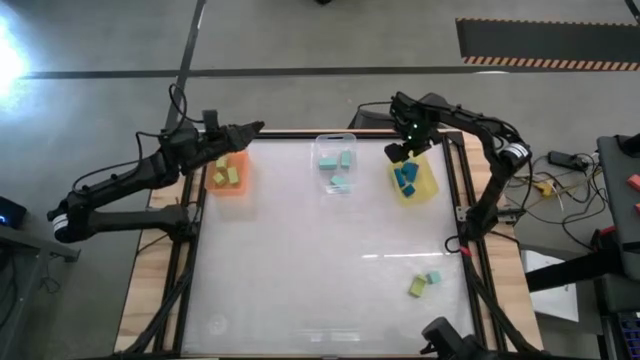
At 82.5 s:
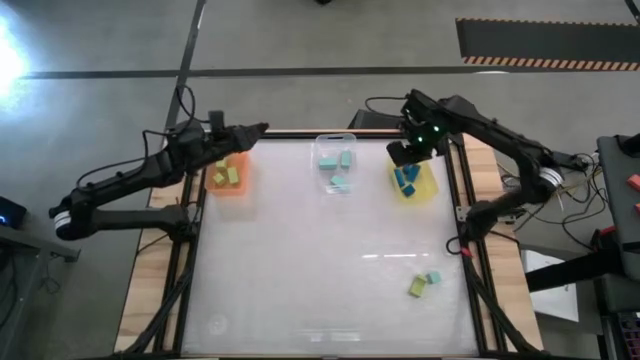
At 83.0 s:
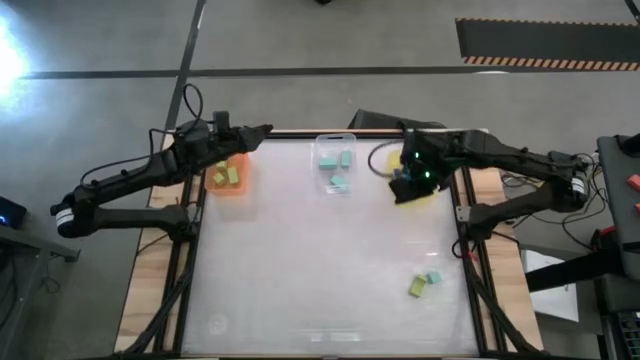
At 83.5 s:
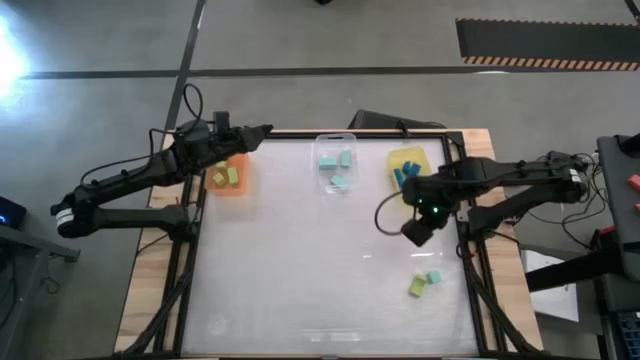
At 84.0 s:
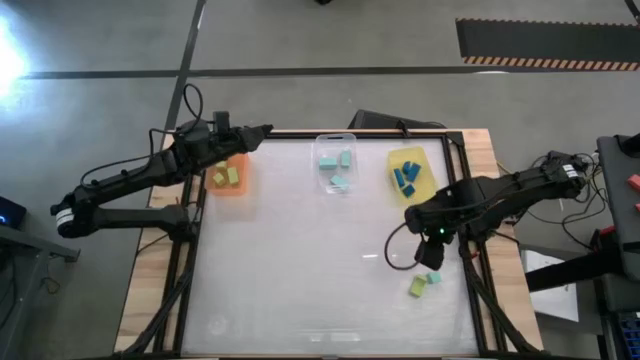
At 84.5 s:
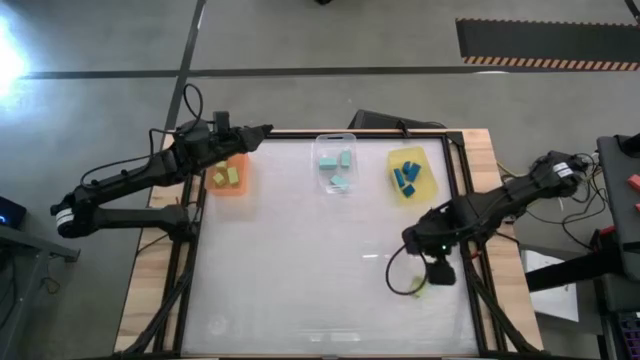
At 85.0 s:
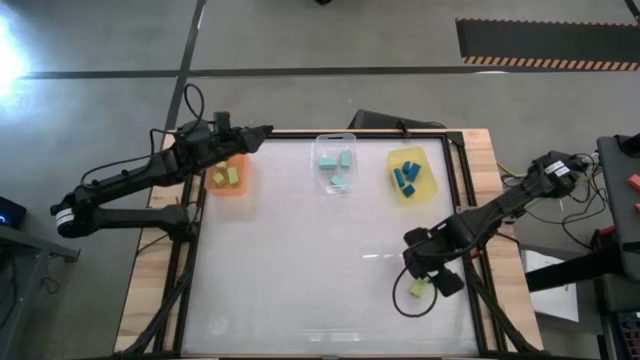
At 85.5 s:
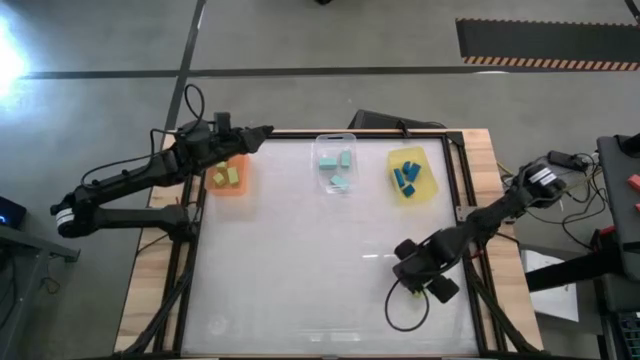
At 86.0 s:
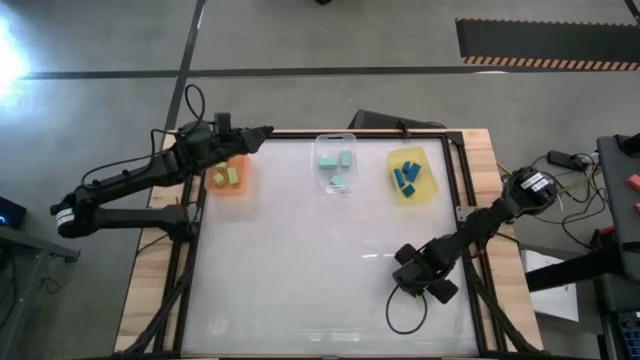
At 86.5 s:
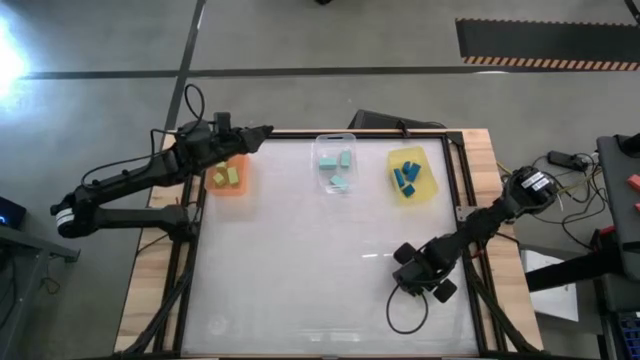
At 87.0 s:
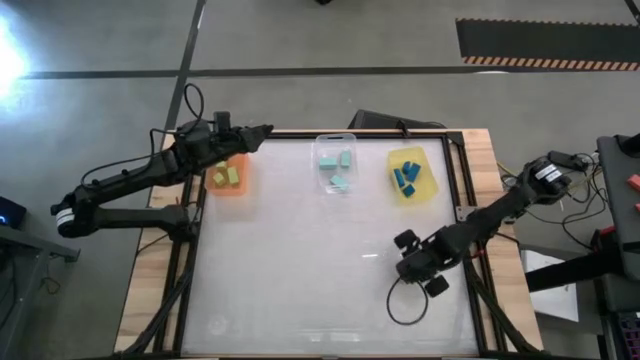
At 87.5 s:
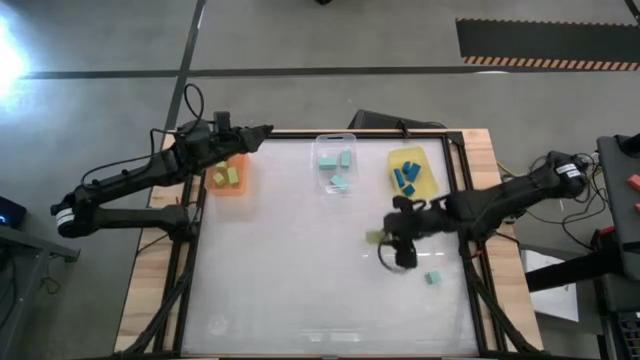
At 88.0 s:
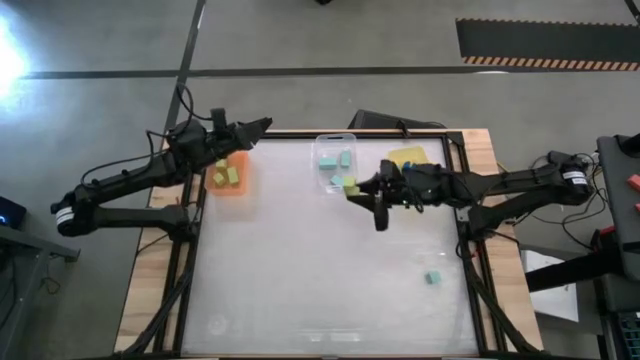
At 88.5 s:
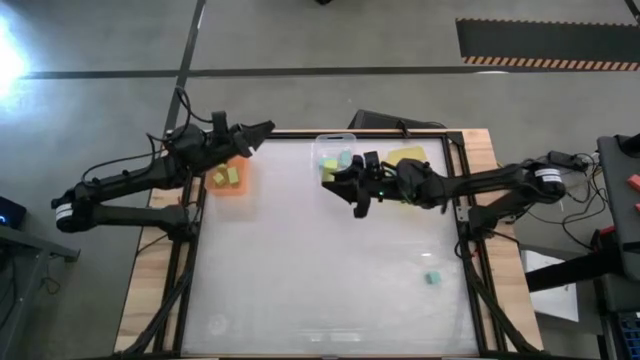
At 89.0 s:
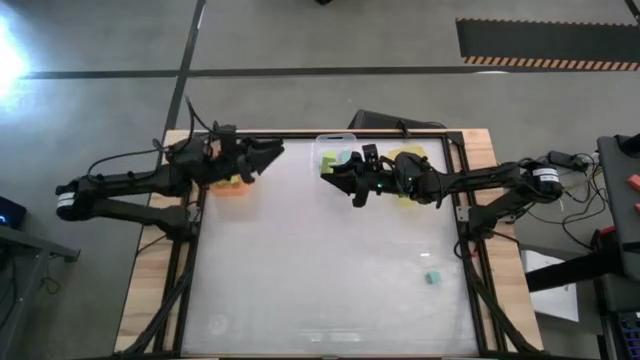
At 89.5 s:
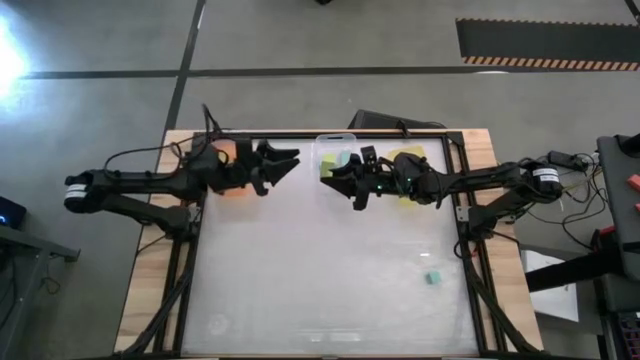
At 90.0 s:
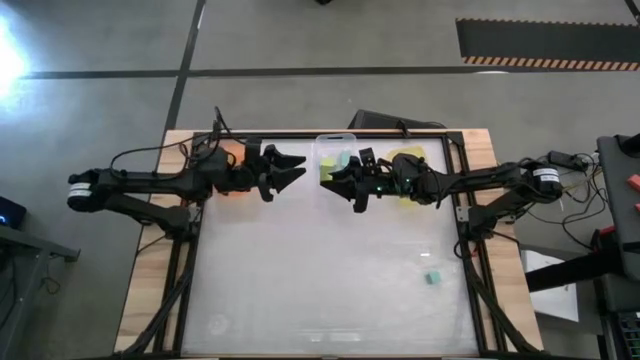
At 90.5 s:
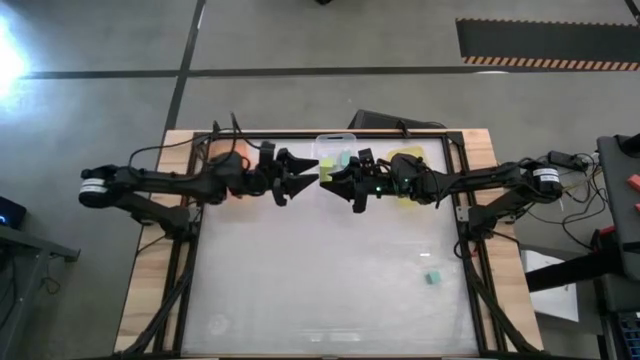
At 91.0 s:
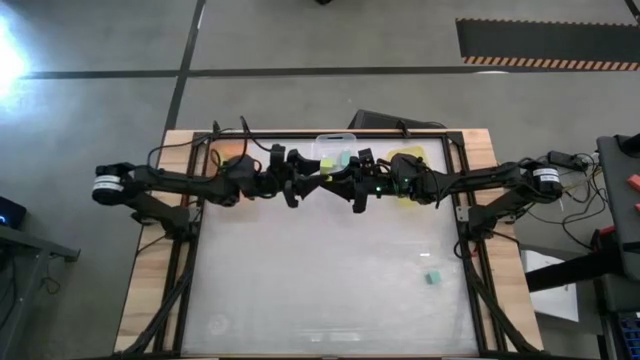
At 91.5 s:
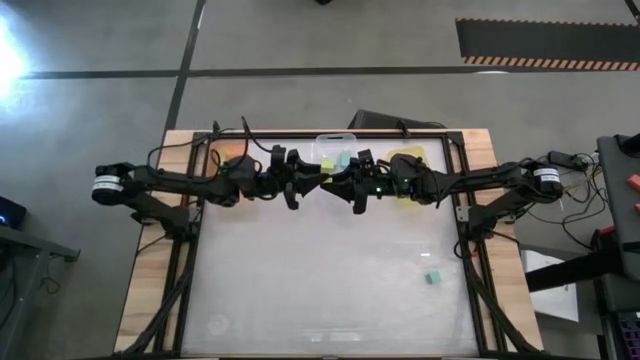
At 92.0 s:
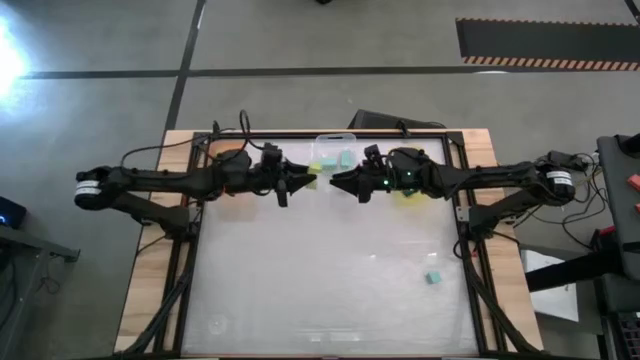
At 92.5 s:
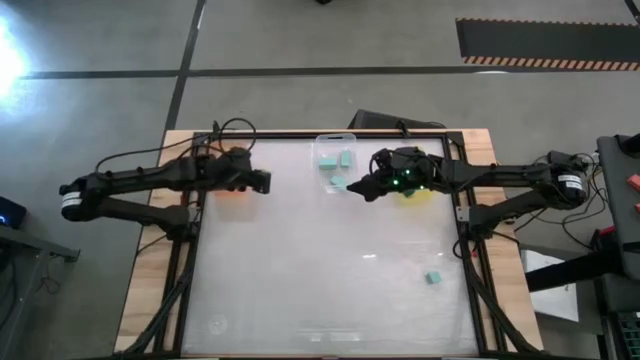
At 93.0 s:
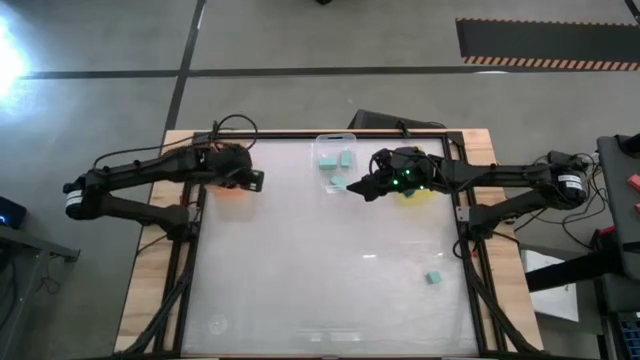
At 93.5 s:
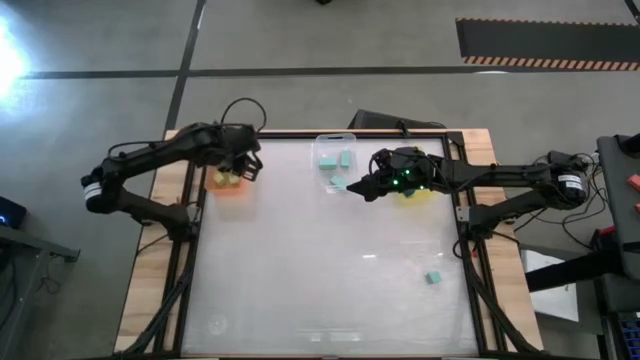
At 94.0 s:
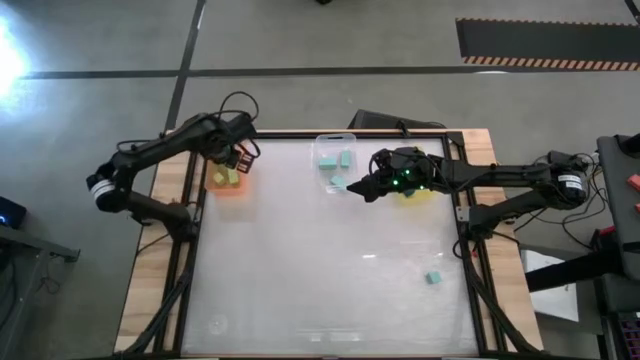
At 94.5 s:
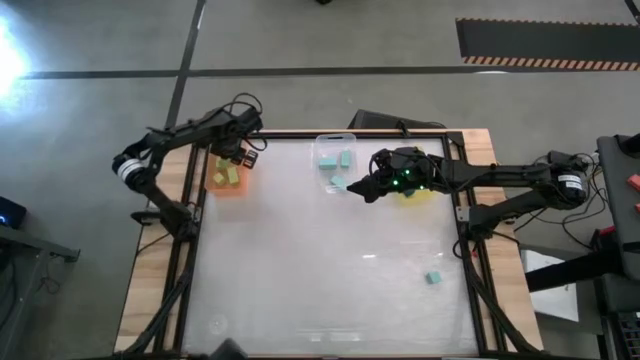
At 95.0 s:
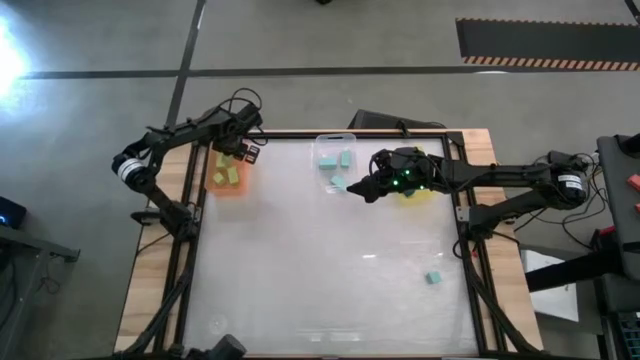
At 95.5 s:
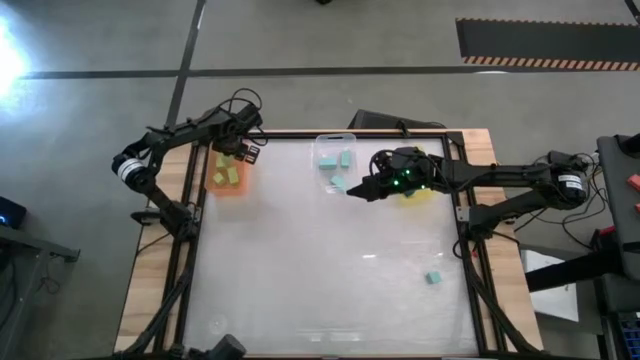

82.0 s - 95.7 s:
Task: Sort & place blocks by color
Put the light green block into the orange bin

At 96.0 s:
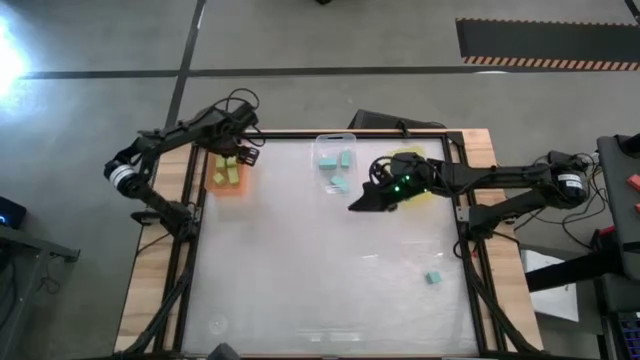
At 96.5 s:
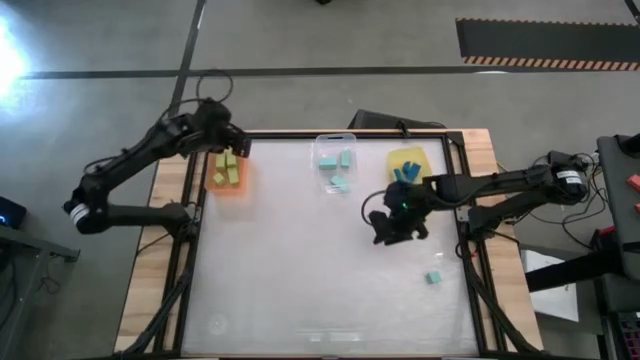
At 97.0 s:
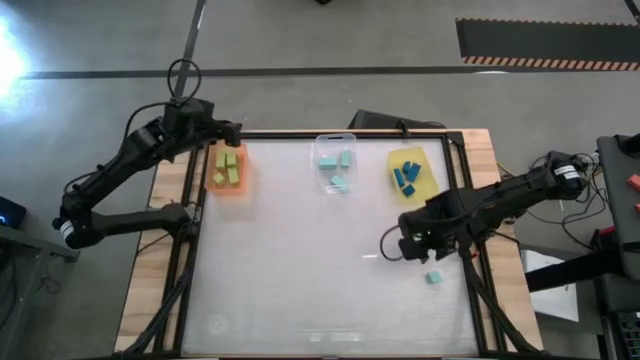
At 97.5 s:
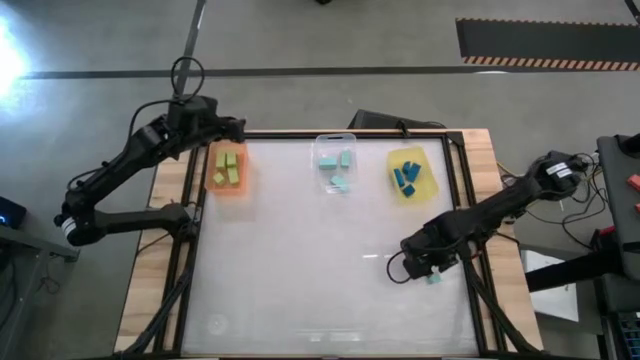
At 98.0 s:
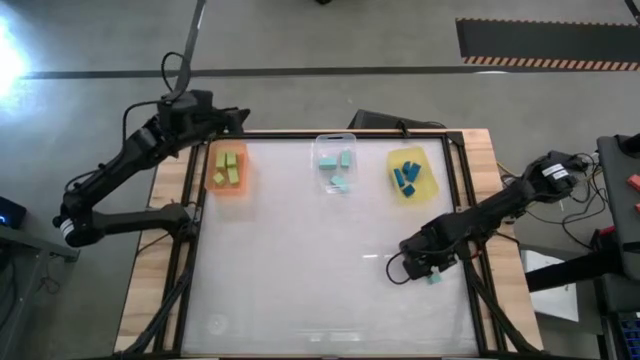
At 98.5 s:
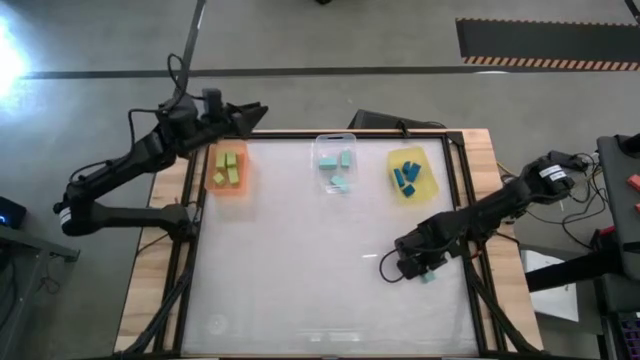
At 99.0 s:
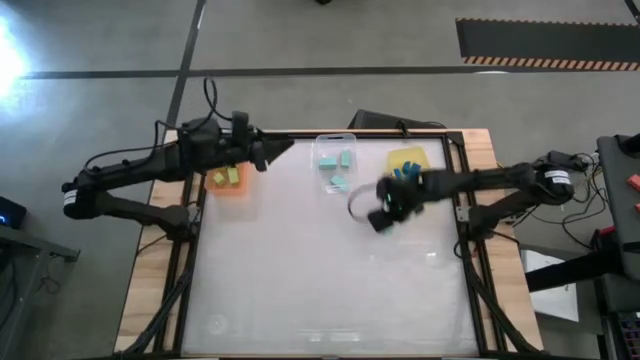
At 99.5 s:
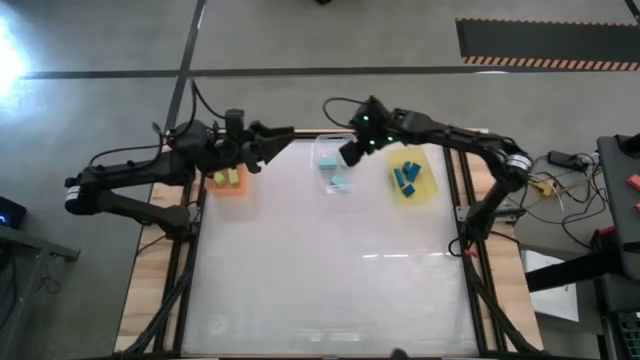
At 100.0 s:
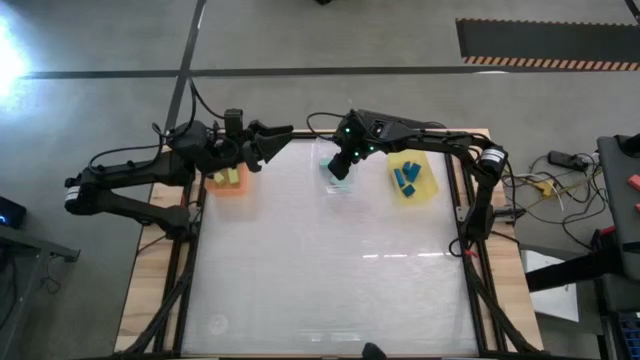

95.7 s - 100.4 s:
Put the light blue block into the transparent bin

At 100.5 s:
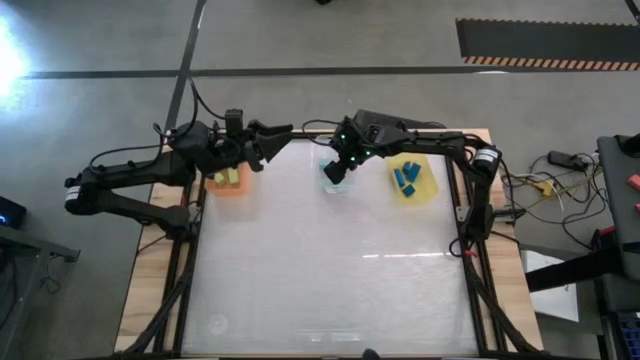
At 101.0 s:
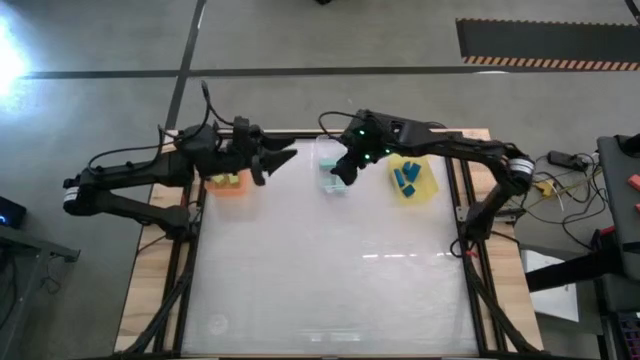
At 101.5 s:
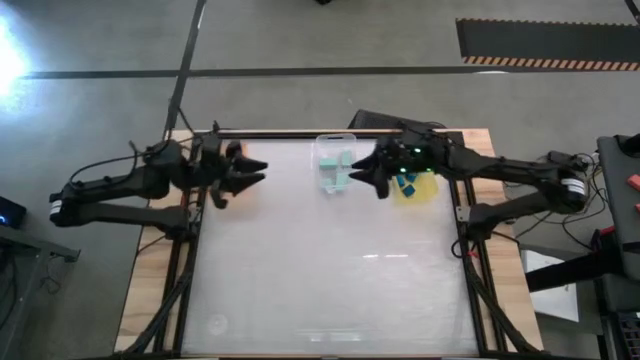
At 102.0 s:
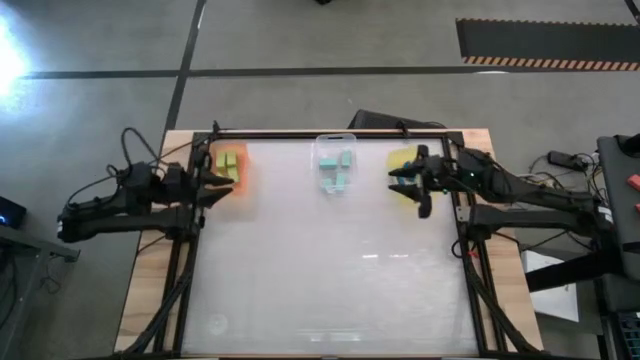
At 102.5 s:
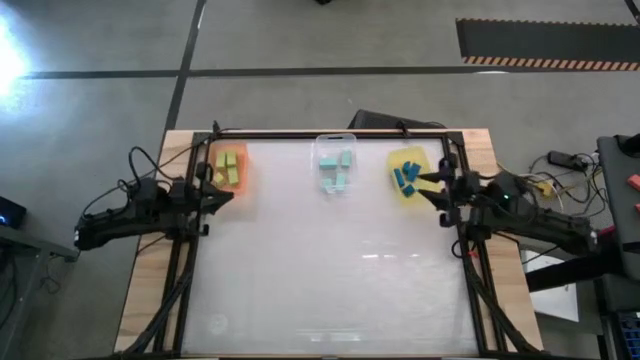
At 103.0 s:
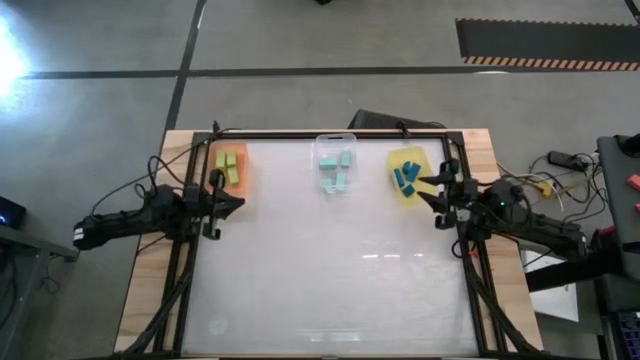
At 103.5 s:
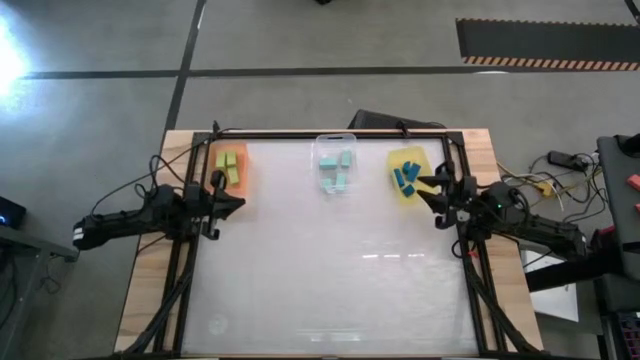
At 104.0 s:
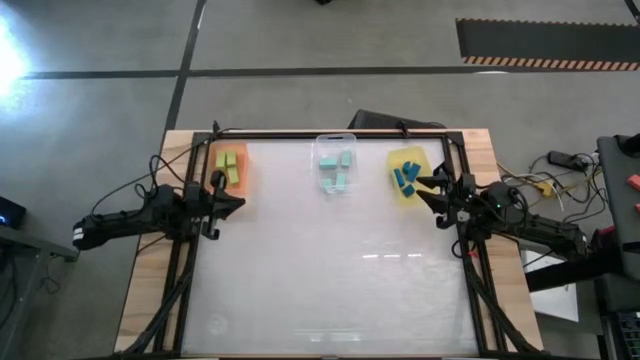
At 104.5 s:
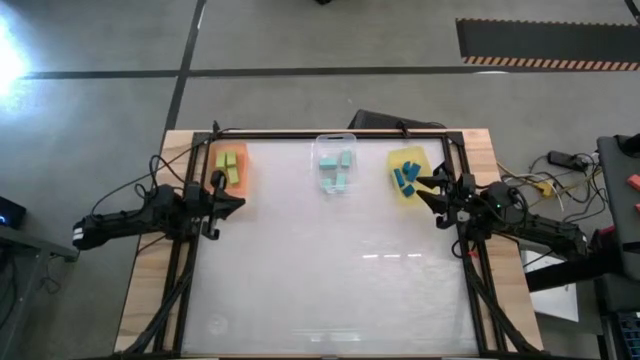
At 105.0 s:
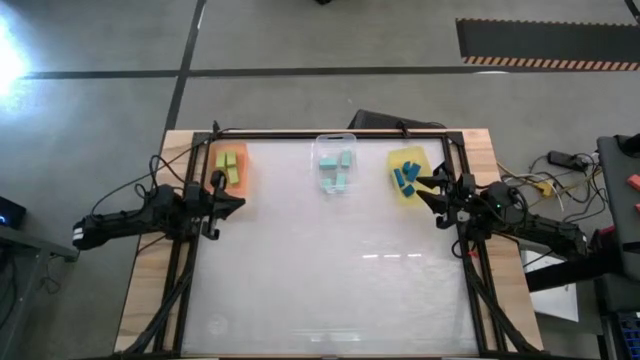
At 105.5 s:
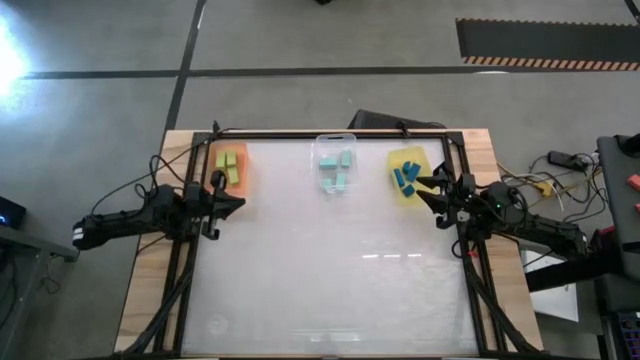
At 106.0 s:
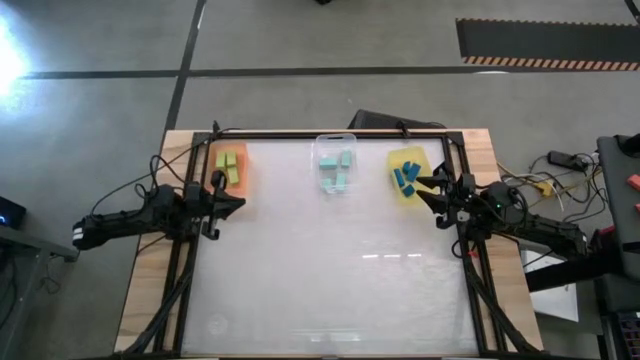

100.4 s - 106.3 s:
Return to Home Position
